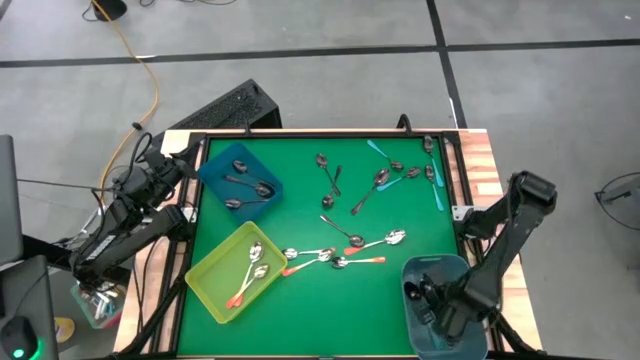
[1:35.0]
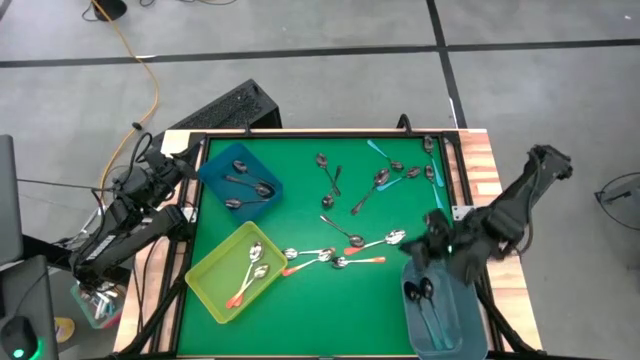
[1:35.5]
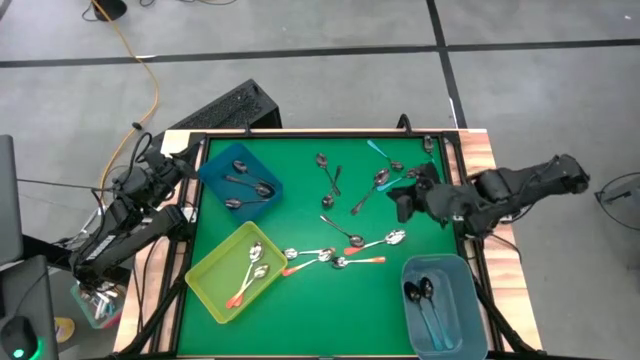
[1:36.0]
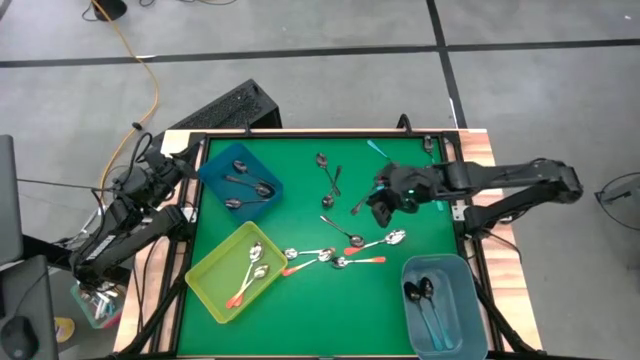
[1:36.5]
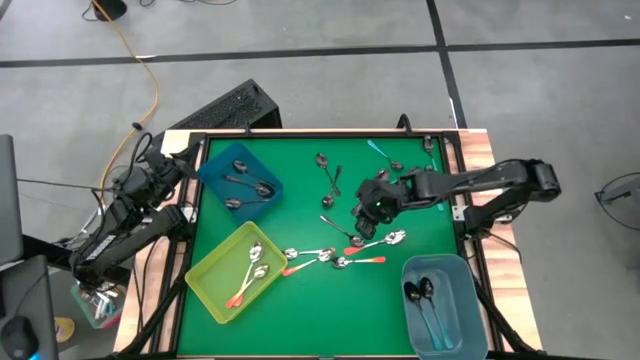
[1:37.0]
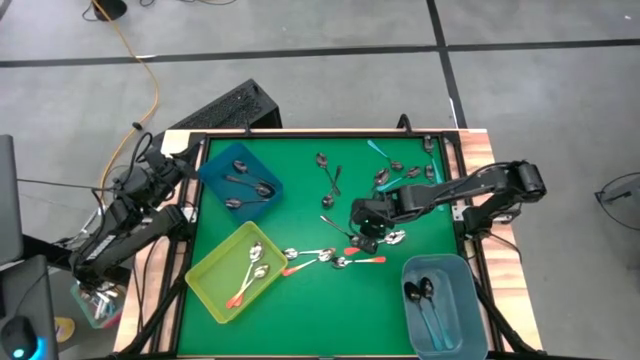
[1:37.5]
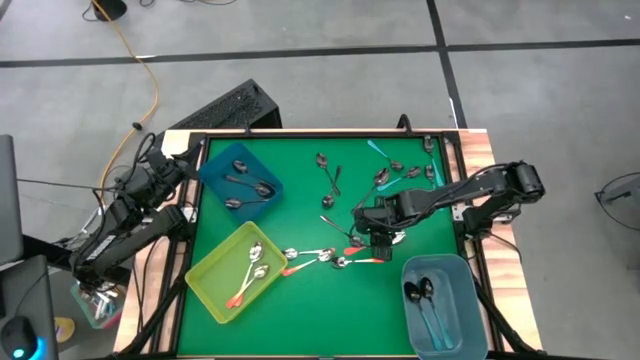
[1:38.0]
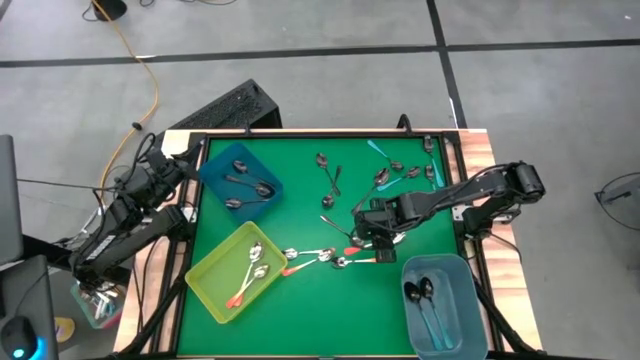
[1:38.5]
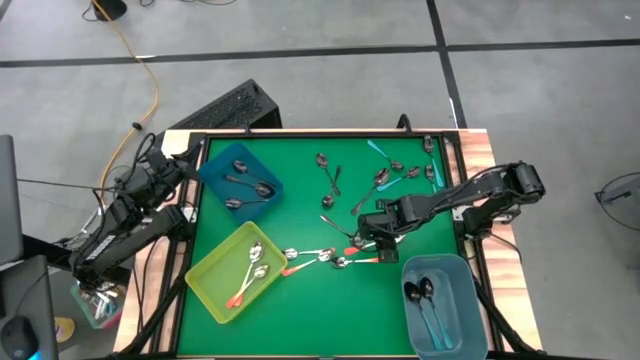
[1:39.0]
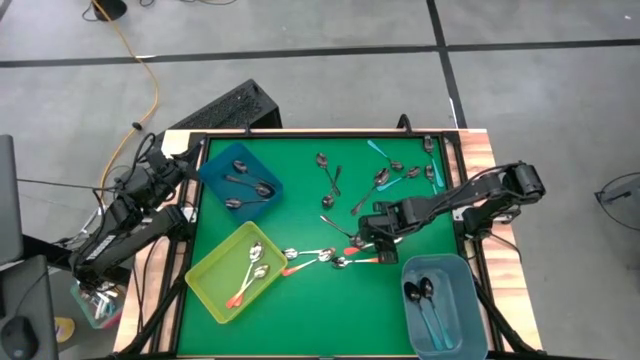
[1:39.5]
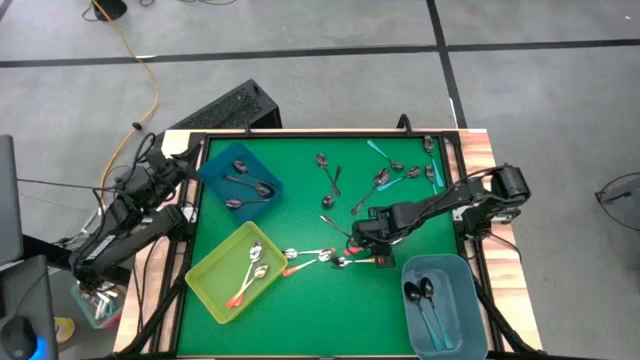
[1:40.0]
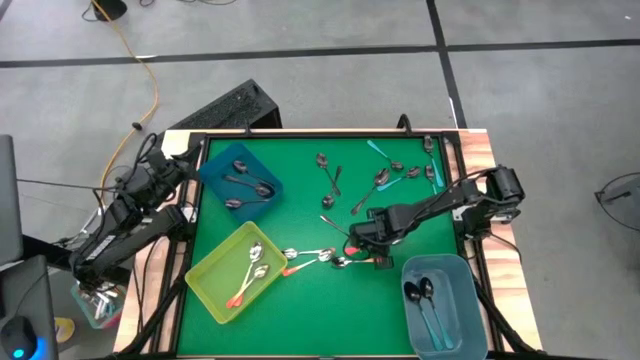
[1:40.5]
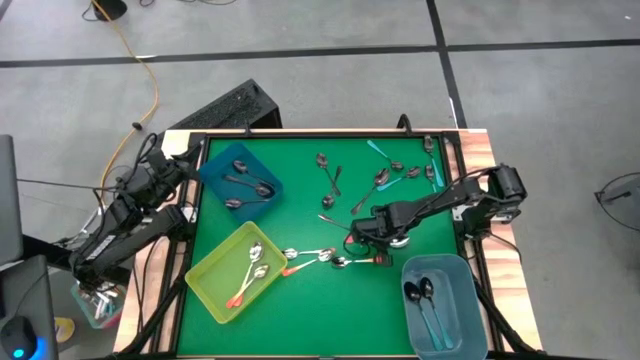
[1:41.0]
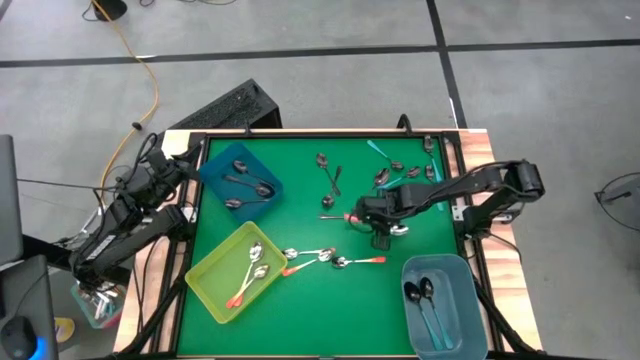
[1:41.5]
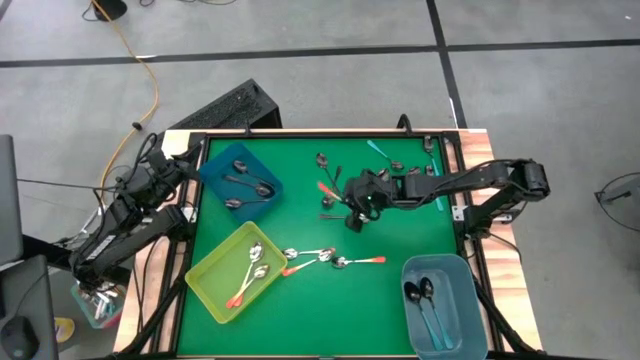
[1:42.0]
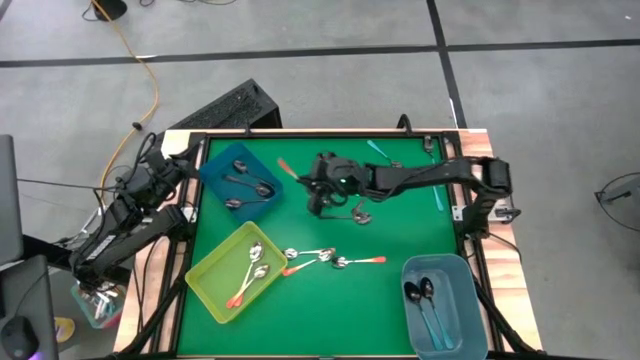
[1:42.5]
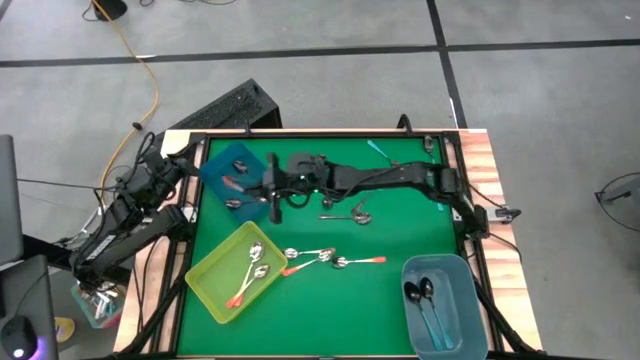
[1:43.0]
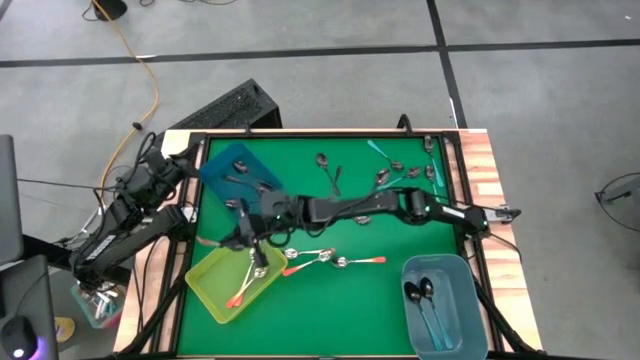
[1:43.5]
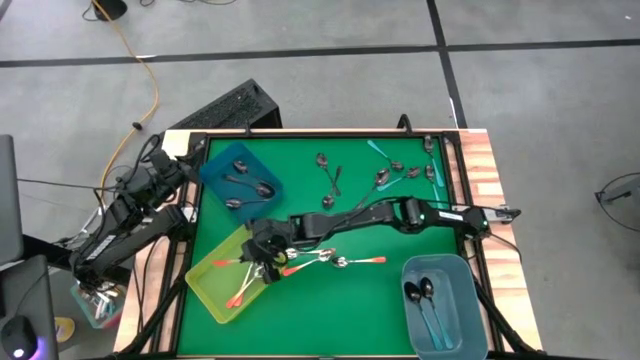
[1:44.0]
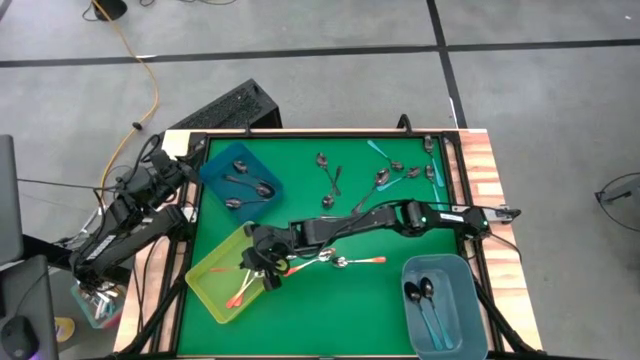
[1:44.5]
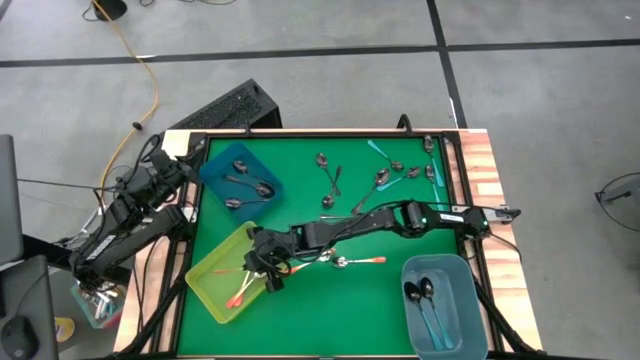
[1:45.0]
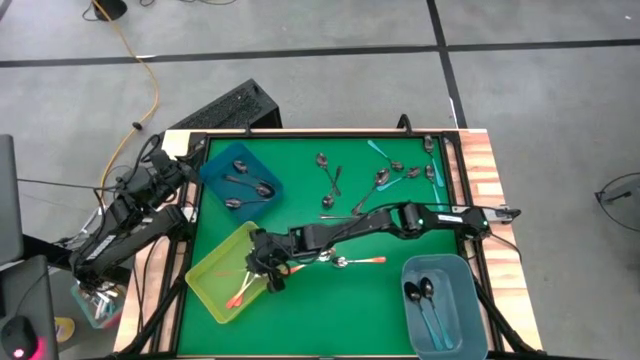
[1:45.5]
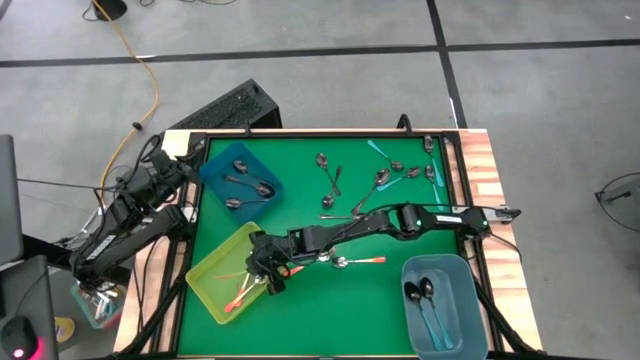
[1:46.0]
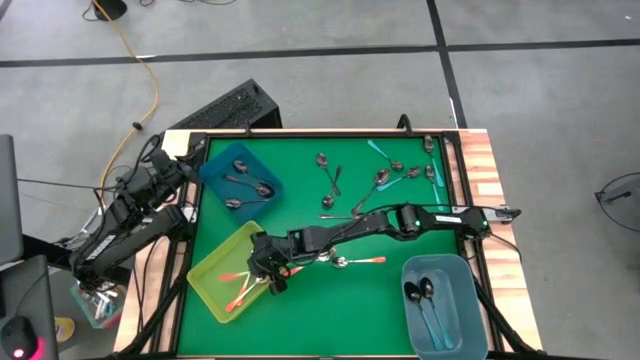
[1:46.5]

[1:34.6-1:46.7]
Task: Sort silverware by color (type)
Put the orange spoon into the green bin

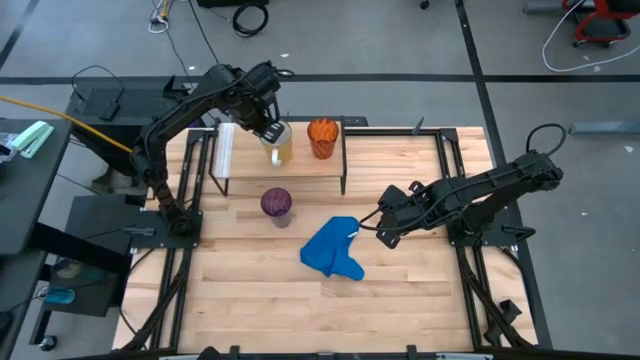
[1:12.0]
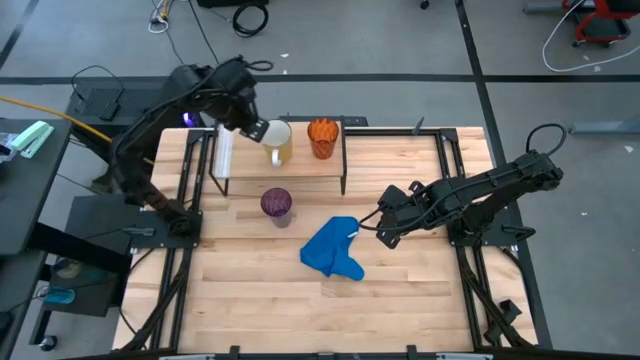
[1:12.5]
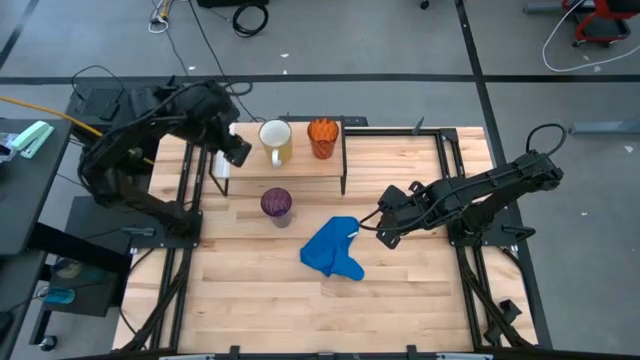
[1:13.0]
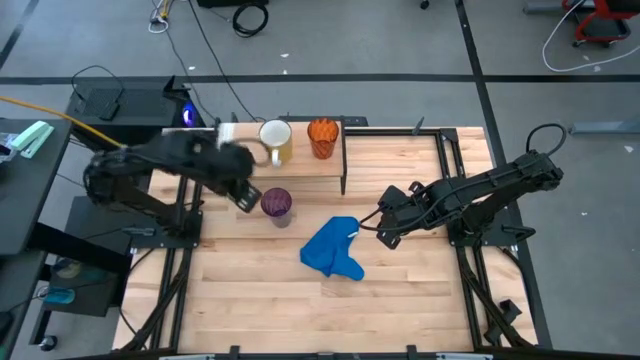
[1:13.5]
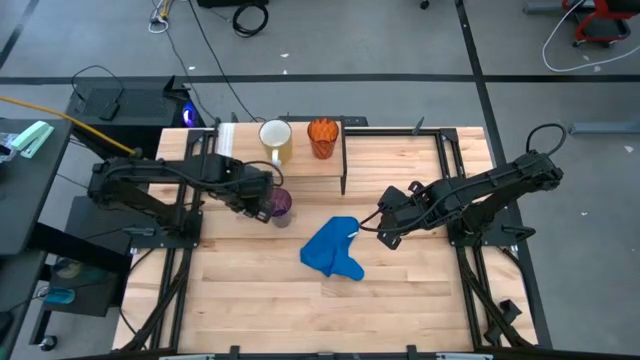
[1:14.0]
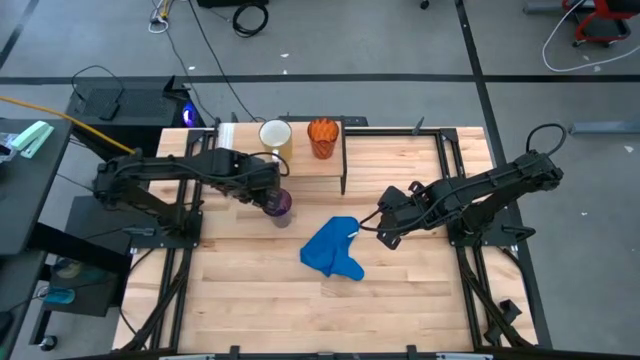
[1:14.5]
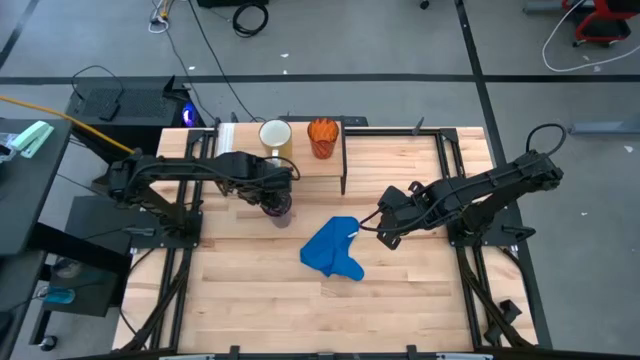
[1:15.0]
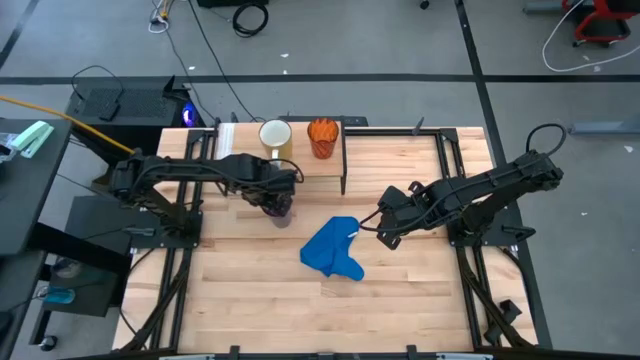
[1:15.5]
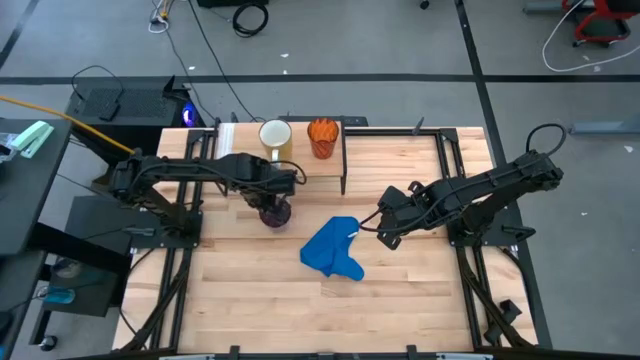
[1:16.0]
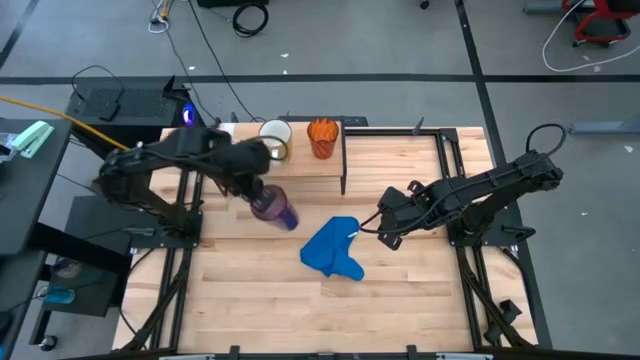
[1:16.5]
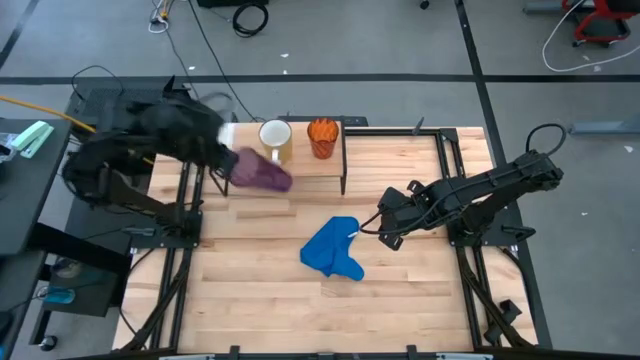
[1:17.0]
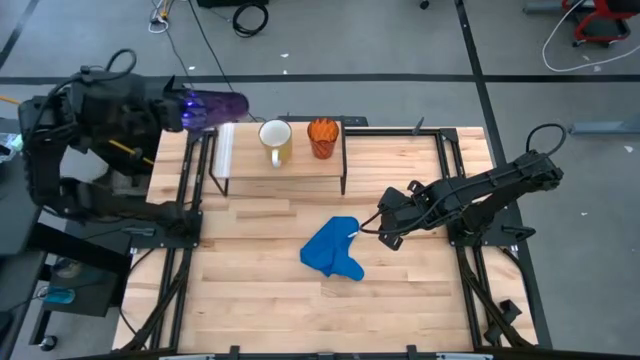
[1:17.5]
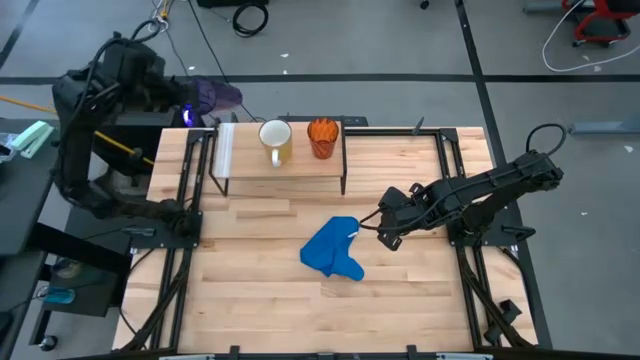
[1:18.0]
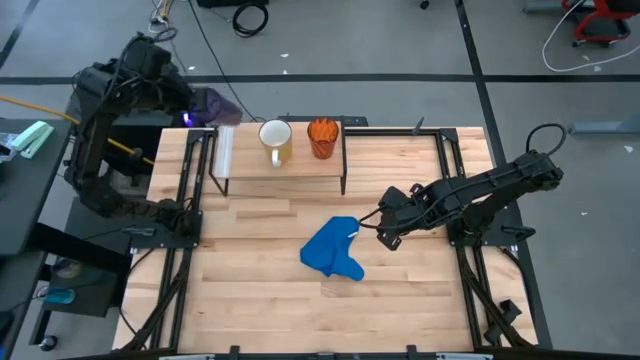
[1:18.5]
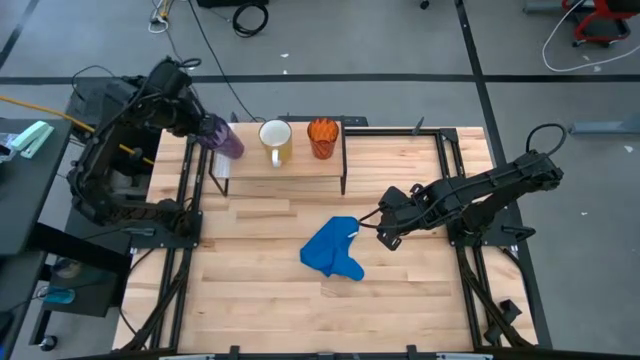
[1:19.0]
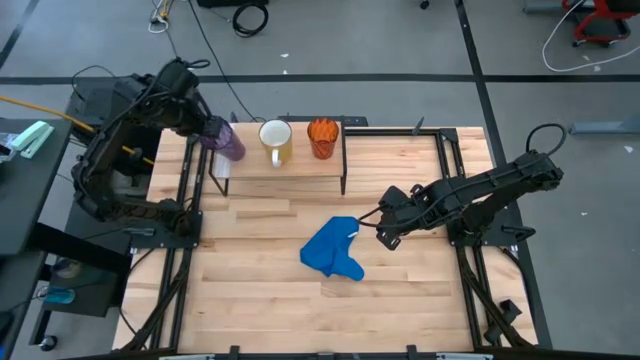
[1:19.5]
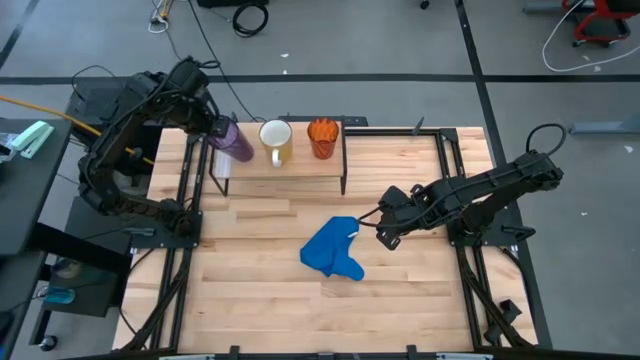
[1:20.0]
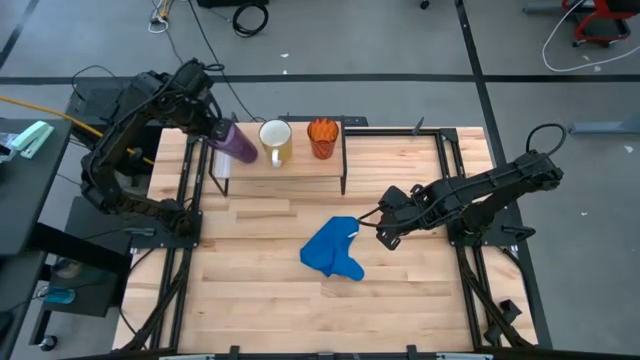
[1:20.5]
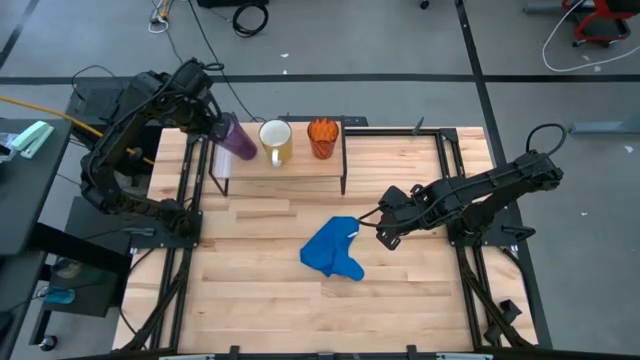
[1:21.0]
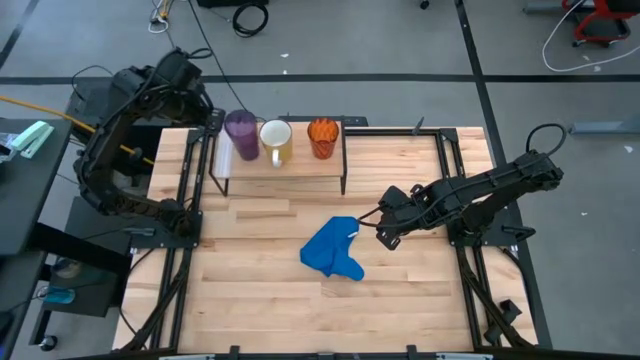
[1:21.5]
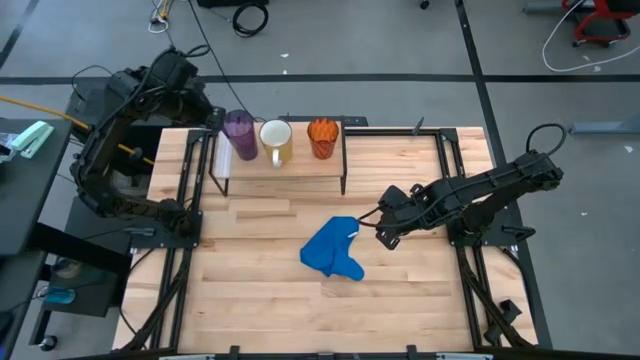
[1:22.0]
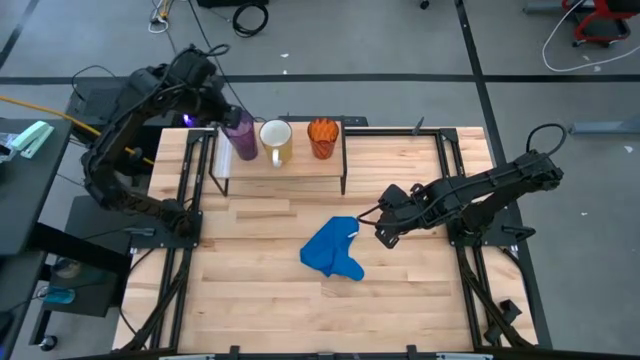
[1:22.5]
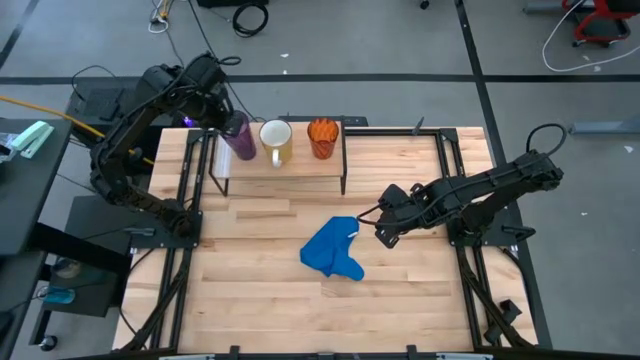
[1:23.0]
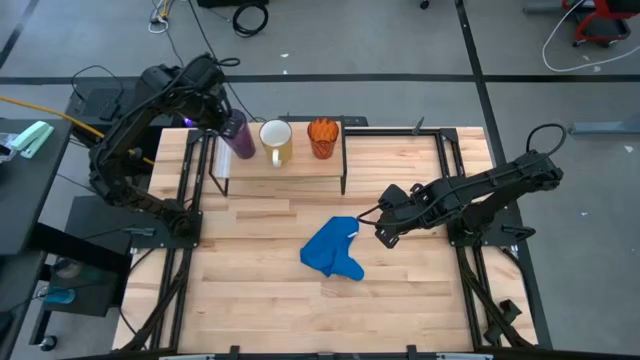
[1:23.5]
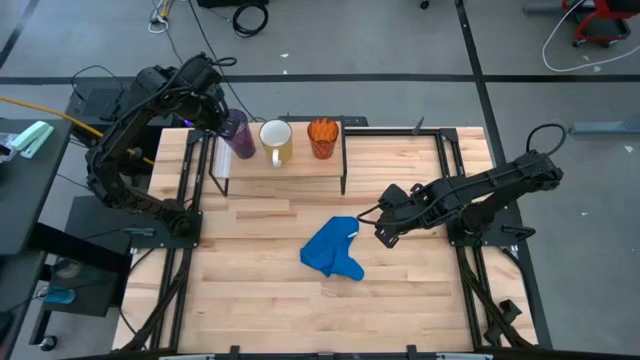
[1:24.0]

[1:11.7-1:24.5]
Task: Stack small to large cups/mugs on shelf
Put the violet glass on the shelf
